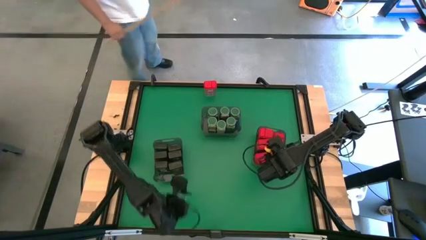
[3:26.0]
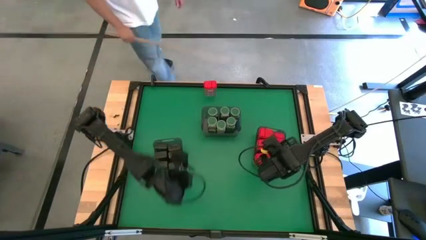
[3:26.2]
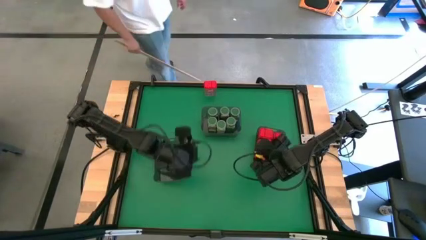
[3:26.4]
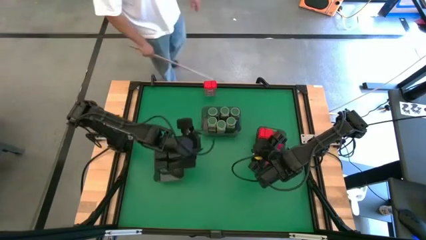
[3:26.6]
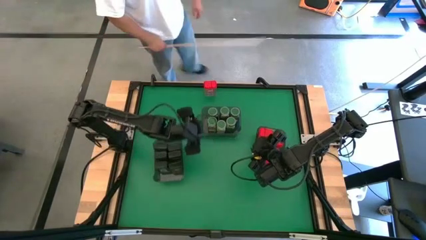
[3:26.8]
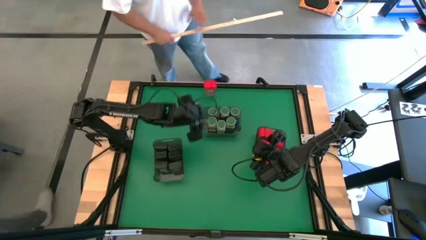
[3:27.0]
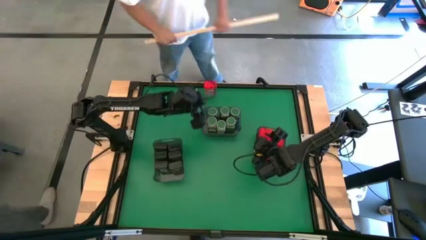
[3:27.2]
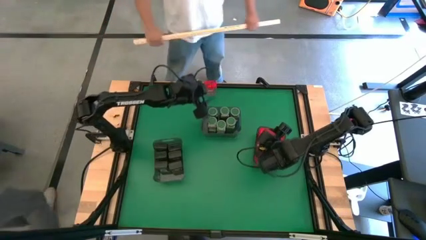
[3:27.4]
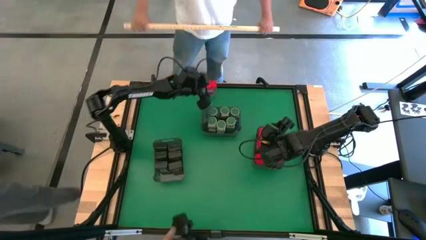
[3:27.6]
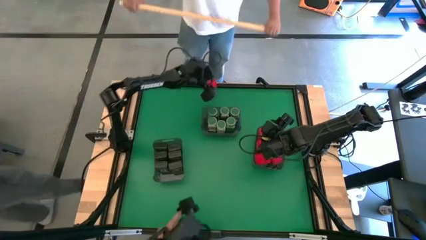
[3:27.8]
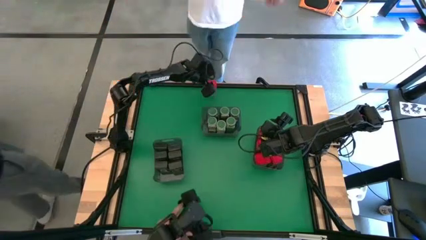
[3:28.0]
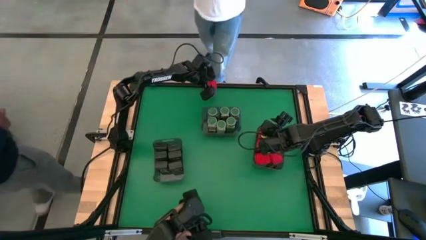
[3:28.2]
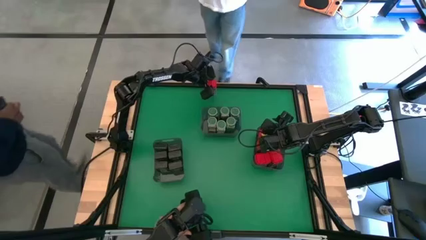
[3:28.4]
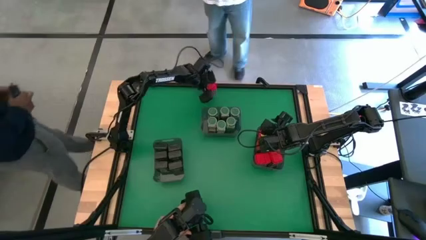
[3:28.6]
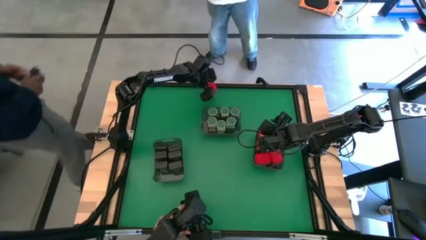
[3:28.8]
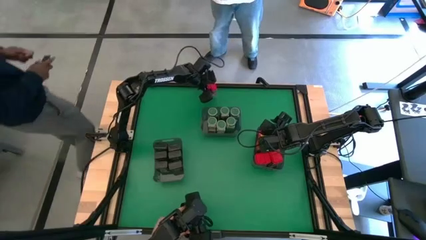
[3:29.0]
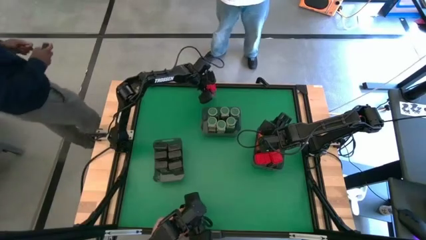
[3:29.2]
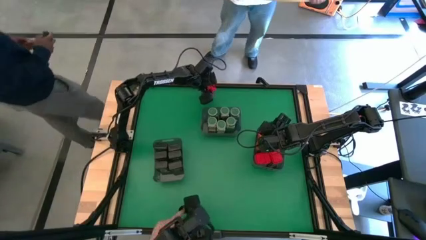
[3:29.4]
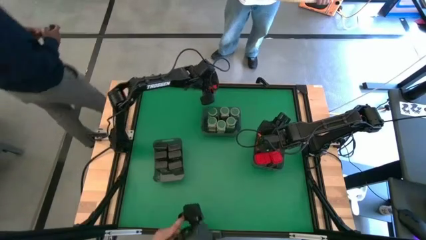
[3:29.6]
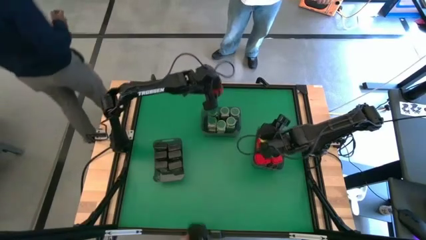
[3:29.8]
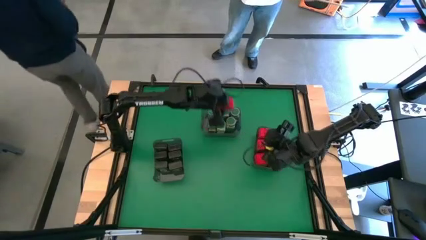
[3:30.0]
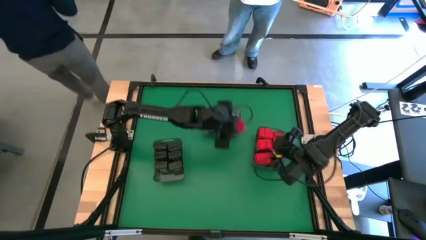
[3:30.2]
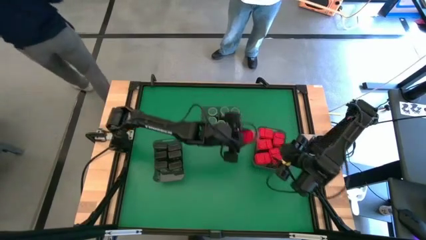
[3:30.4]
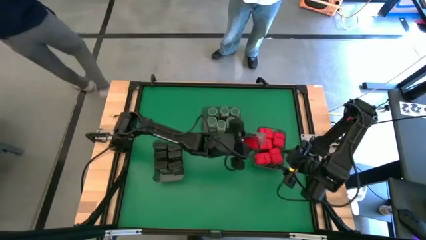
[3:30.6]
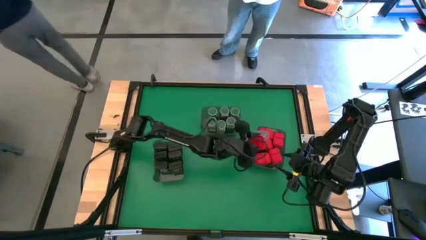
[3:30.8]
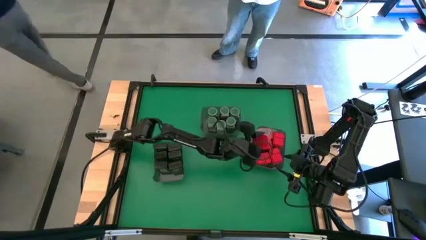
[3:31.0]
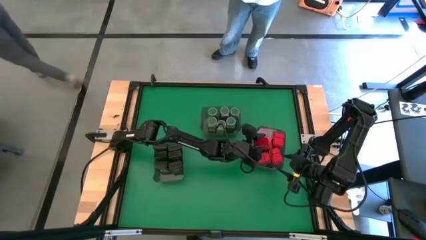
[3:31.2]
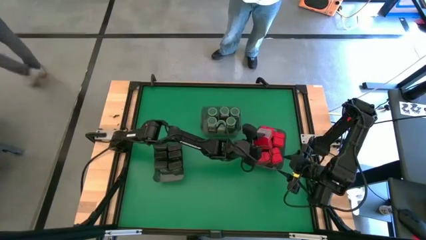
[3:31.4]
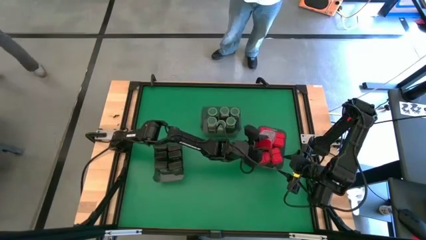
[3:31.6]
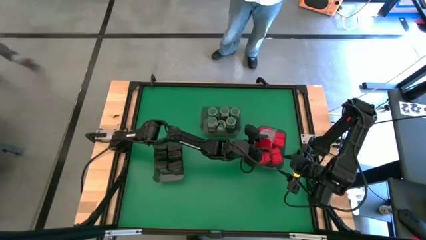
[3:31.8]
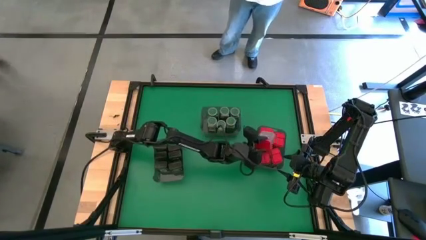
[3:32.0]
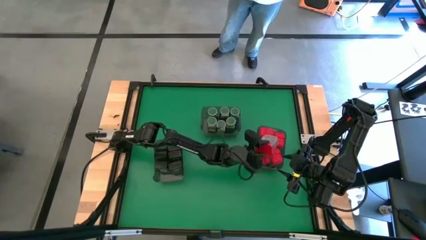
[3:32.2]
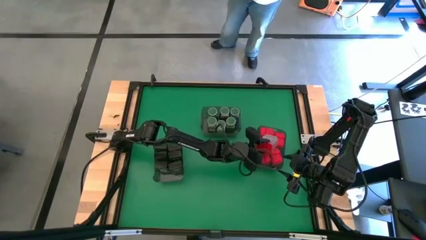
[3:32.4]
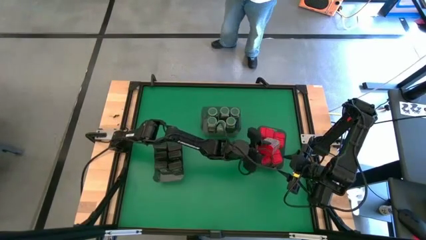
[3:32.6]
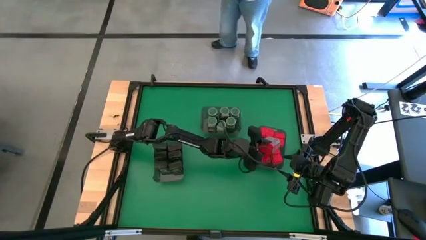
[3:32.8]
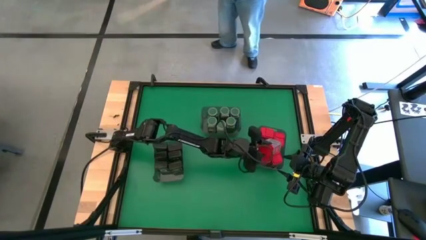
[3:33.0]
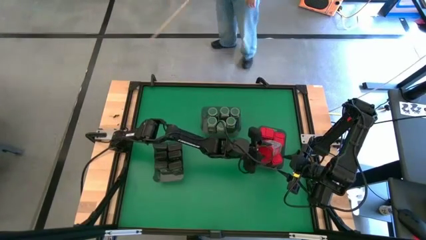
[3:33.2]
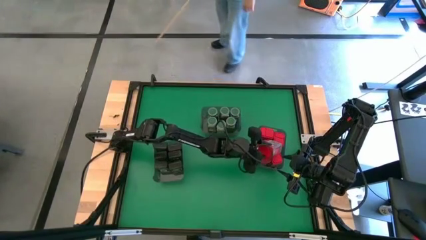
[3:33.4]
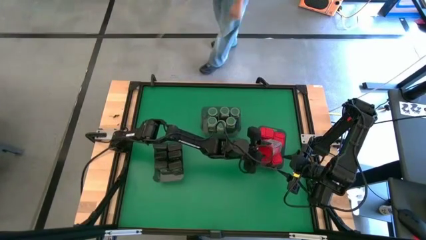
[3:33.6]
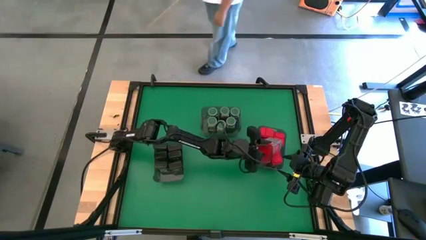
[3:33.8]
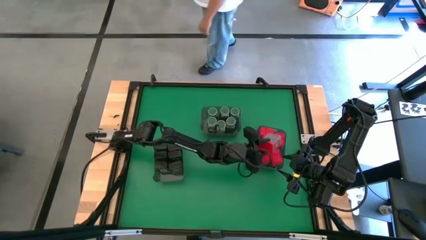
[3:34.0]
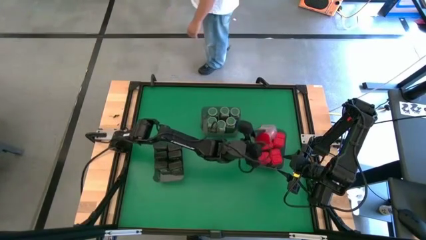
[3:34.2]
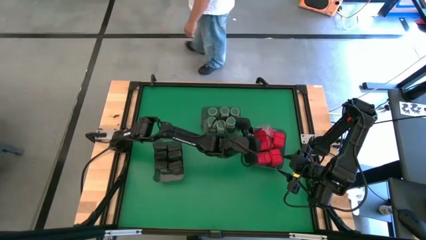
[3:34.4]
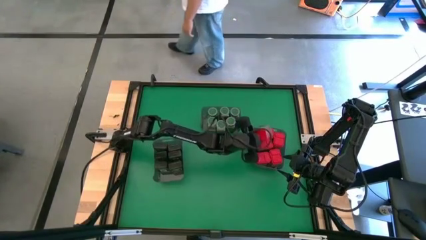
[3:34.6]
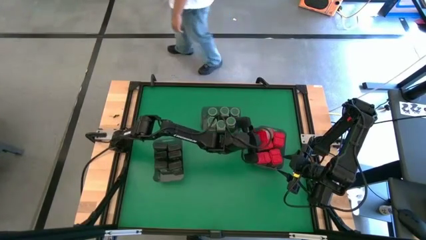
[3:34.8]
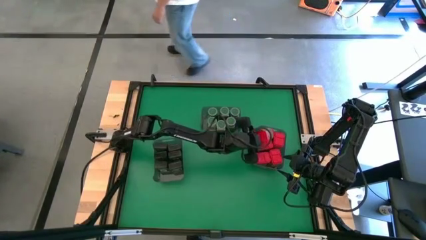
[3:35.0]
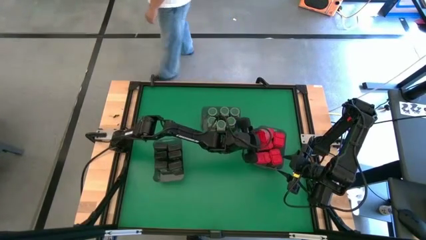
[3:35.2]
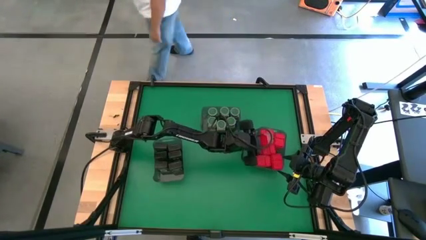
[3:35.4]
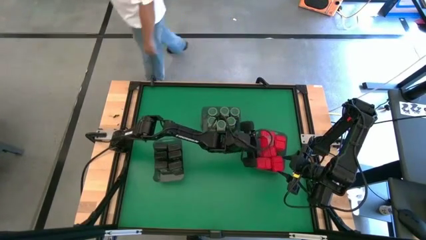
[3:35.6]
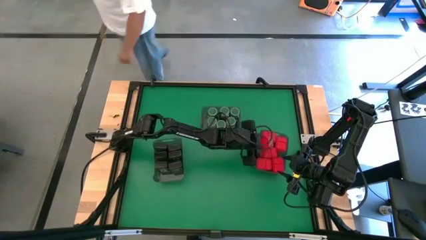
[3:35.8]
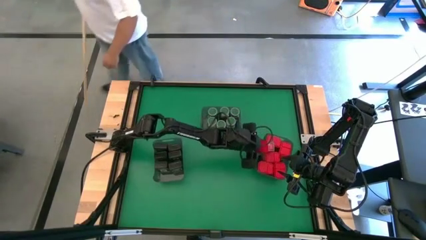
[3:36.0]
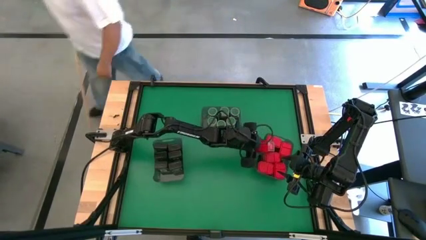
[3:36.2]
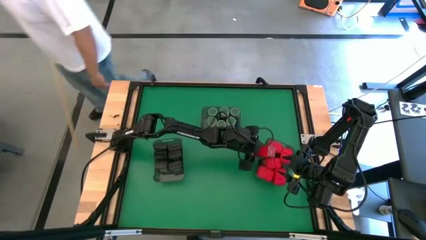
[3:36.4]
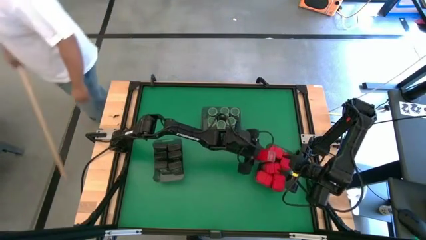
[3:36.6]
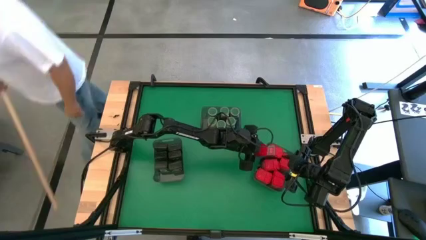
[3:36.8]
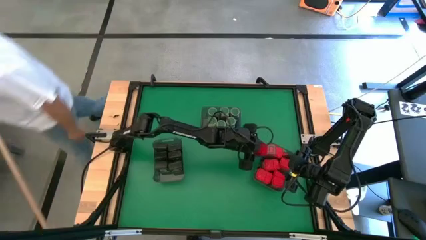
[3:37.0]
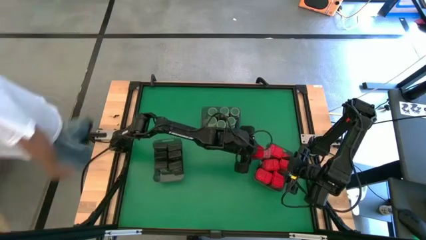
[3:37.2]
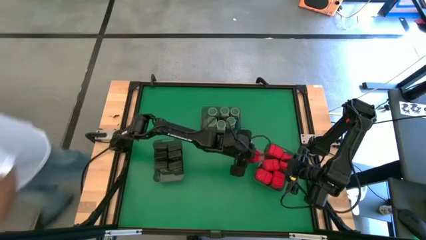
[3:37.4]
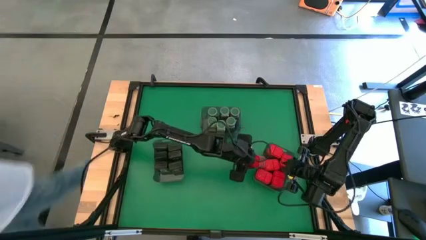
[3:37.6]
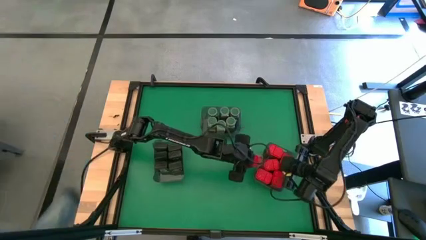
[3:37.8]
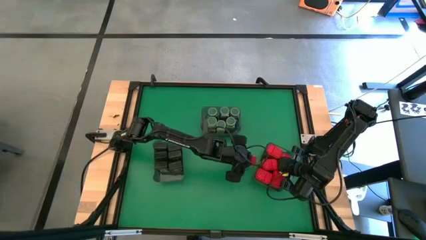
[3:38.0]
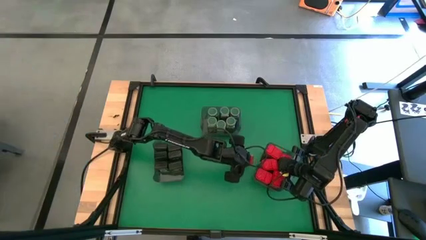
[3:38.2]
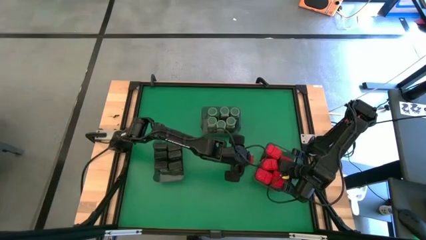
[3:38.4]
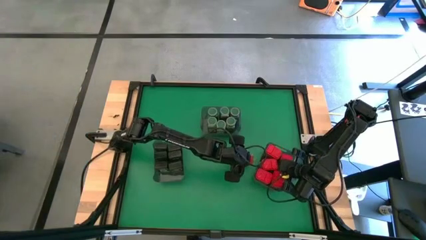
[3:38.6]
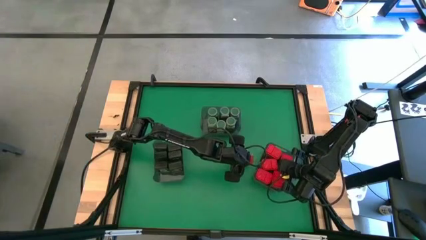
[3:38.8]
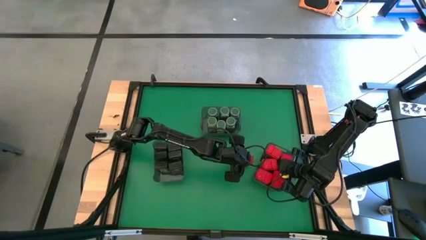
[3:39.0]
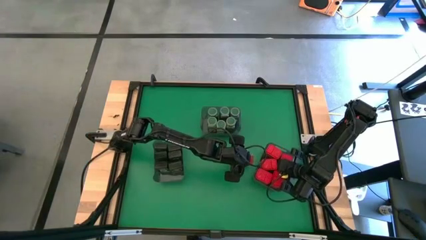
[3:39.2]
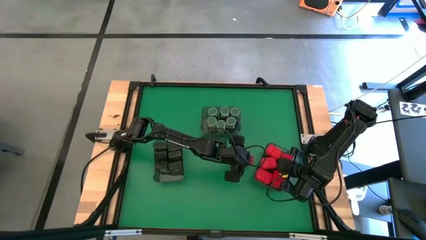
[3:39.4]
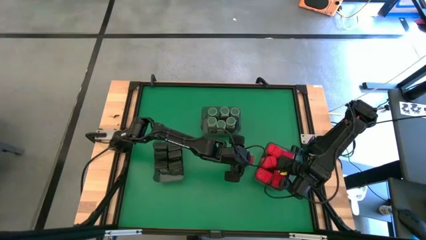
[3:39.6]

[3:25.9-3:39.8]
Task: Sort spices by type
Put the red seasoning can into the right black bin

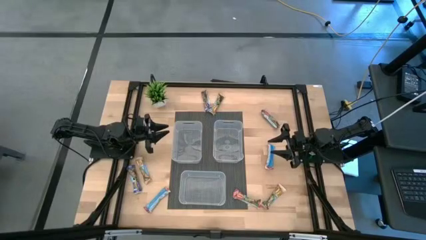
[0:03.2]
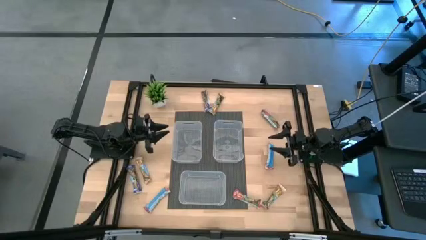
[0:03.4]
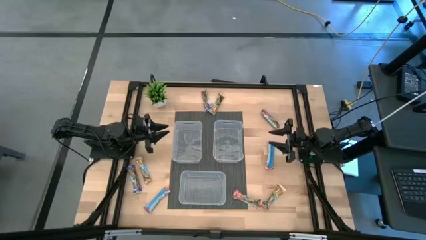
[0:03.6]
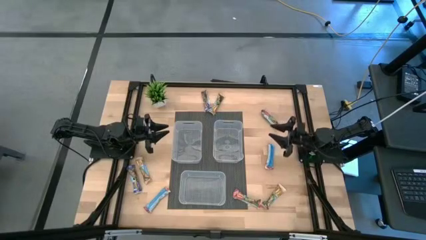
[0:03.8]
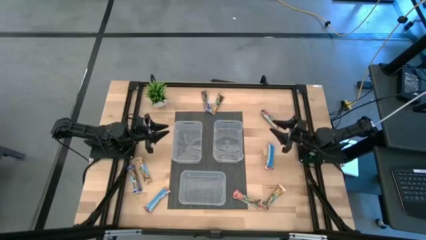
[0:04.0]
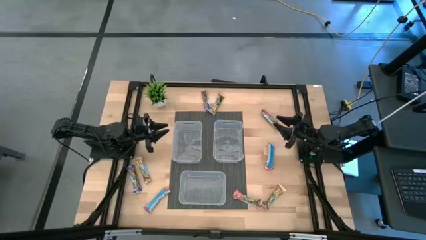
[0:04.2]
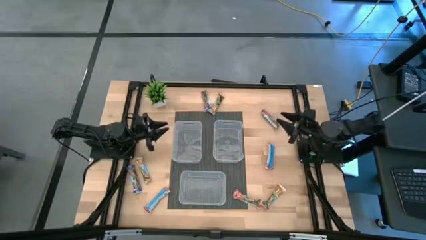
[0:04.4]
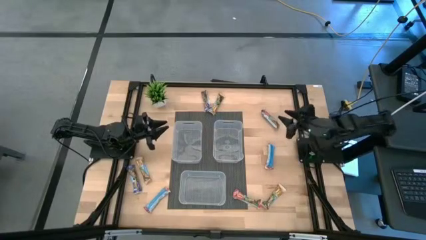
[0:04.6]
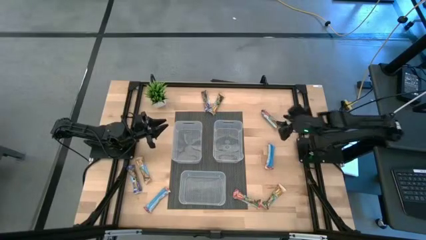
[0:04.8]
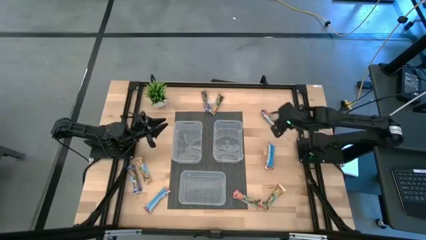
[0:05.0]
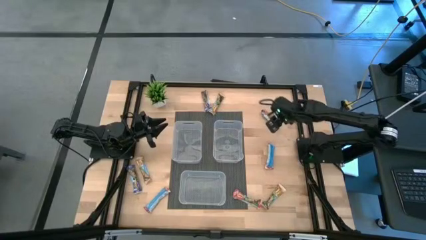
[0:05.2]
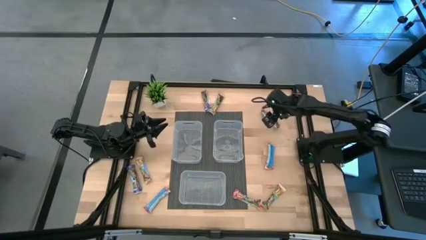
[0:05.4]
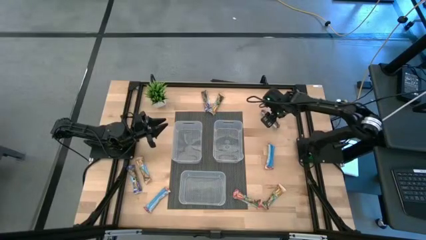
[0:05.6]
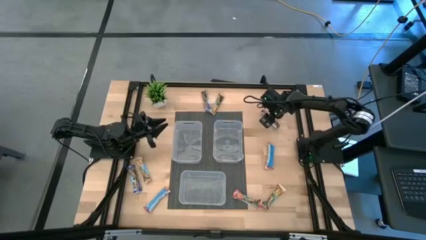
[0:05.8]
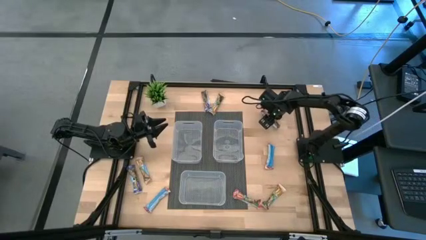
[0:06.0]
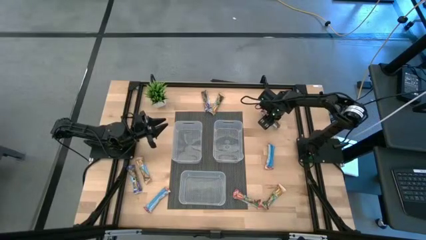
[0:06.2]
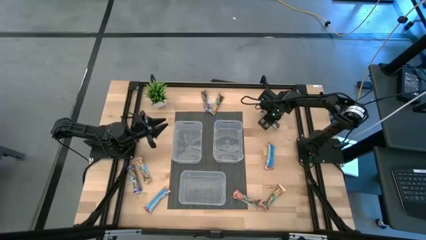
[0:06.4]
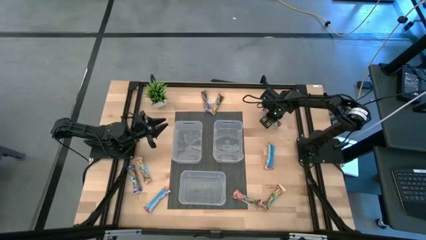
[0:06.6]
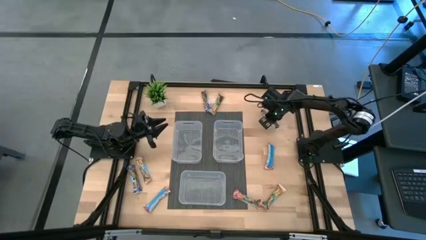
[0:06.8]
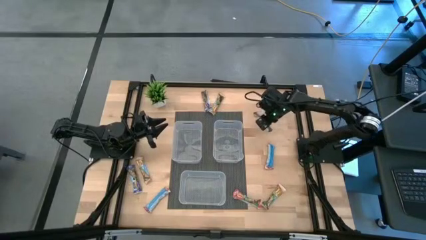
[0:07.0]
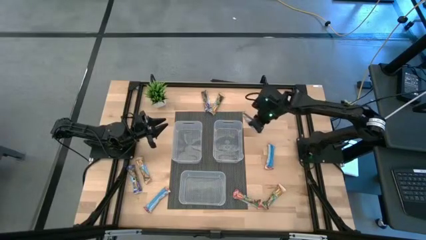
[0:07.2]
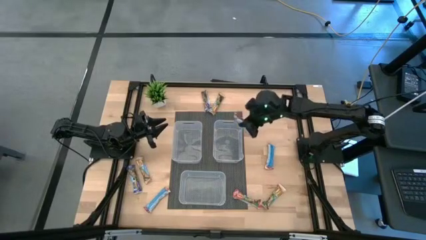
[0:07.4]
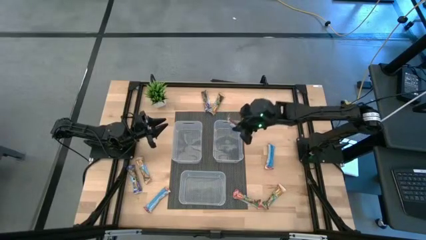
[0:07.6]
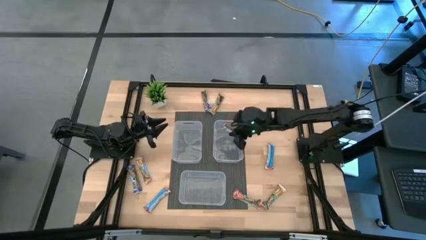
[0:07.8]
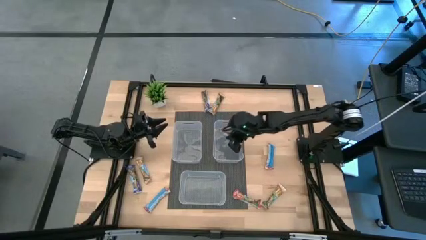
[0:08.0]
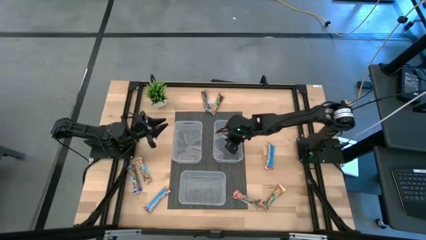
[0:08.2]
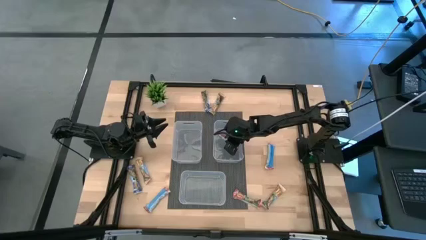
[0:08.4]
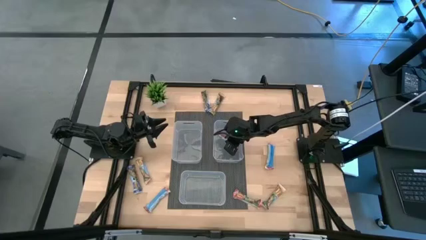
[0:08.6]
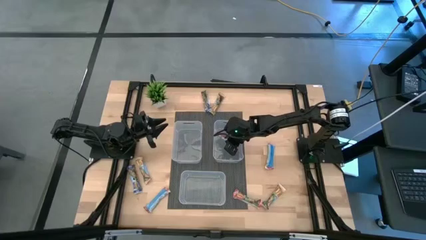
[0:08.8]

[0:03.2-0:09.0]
Task: Pick and place Granola Bars by type
Put the top red granola bar into the top right transparent bin
